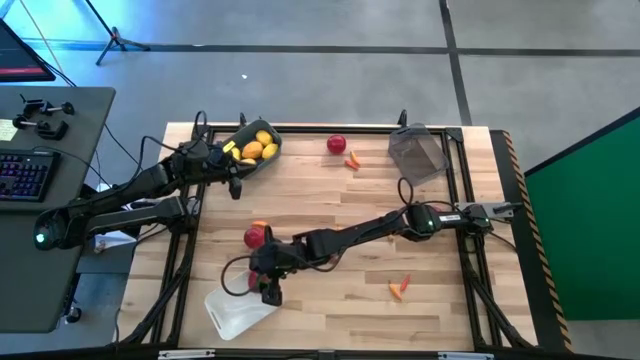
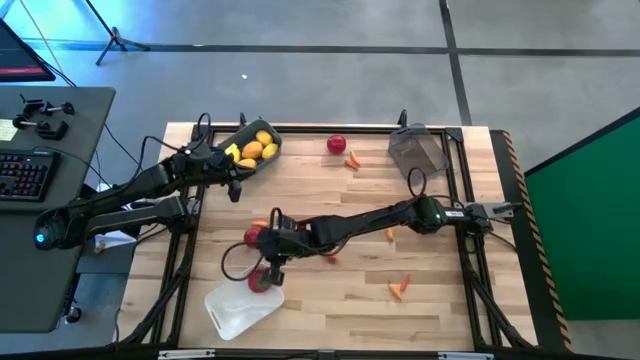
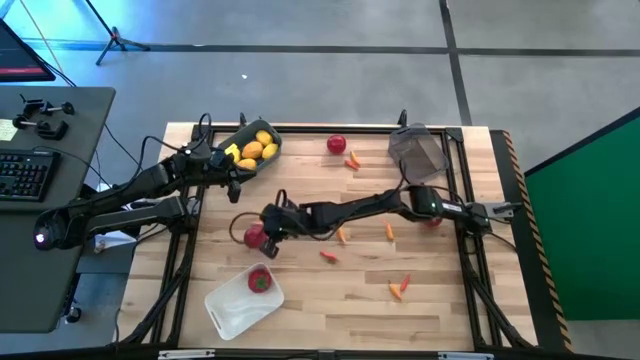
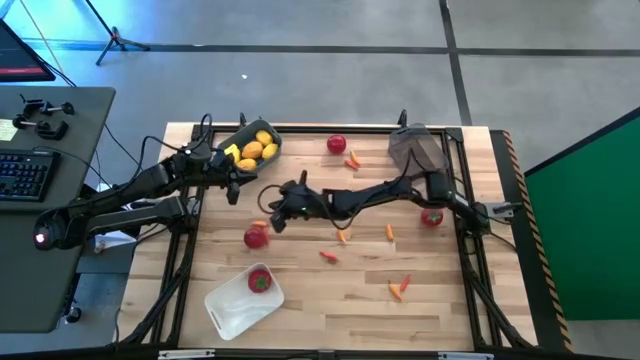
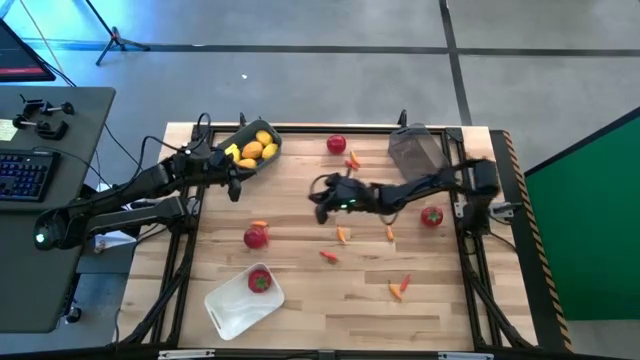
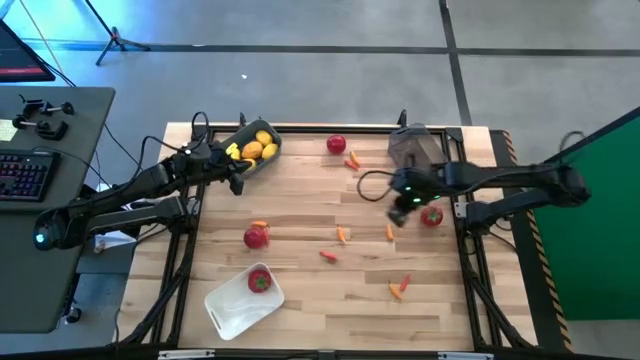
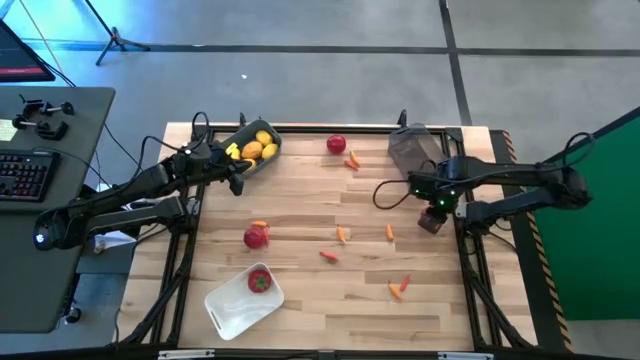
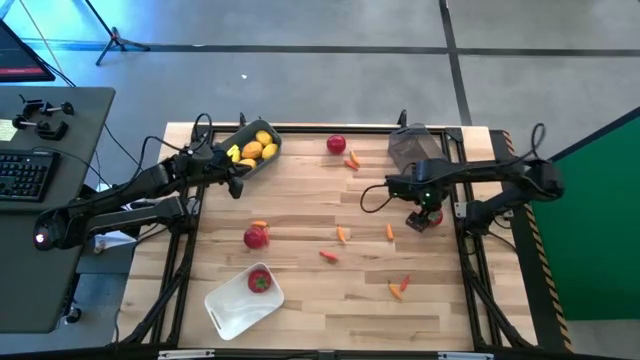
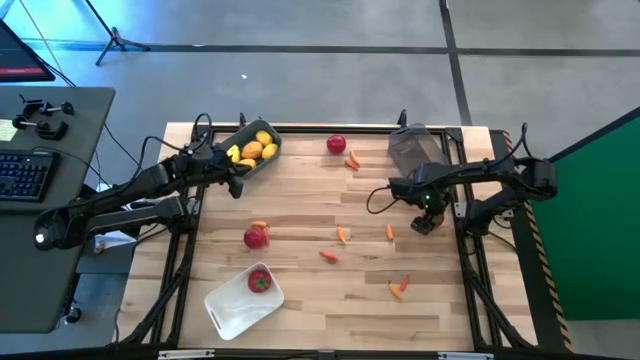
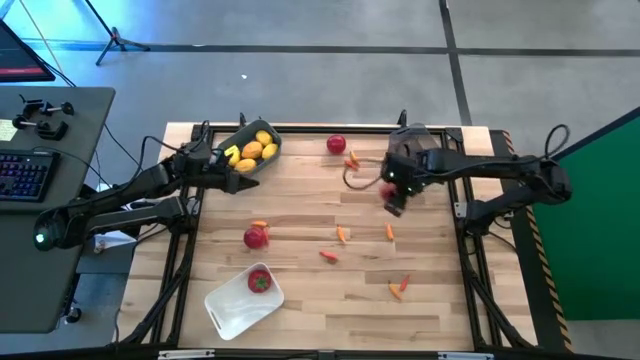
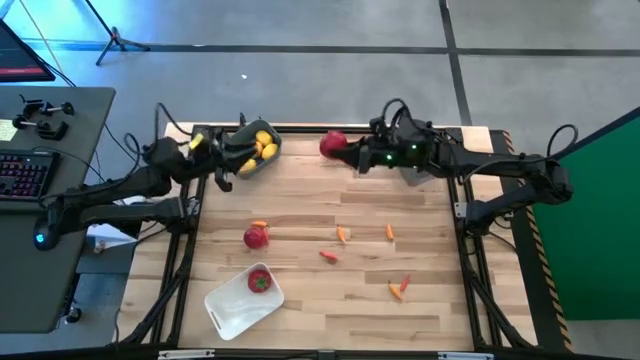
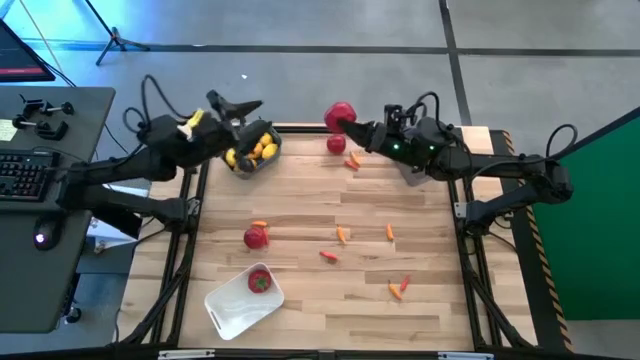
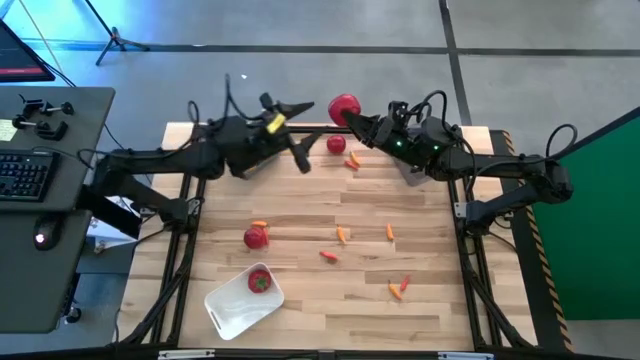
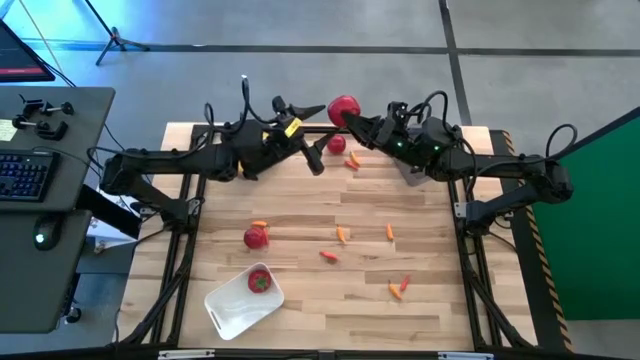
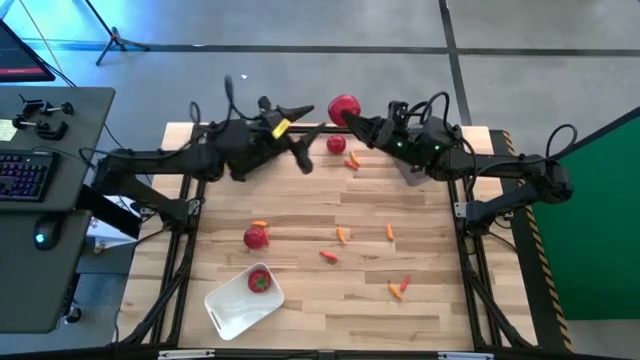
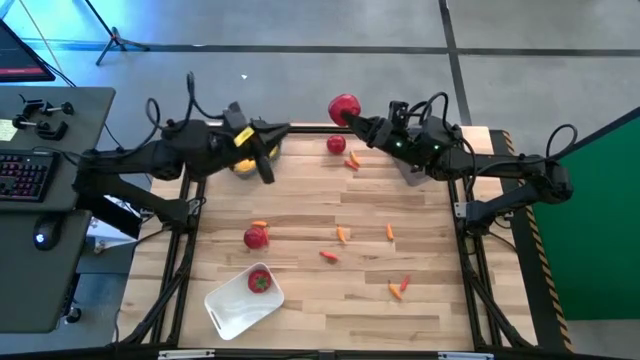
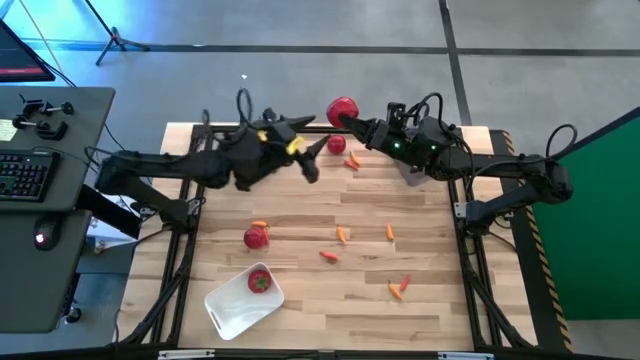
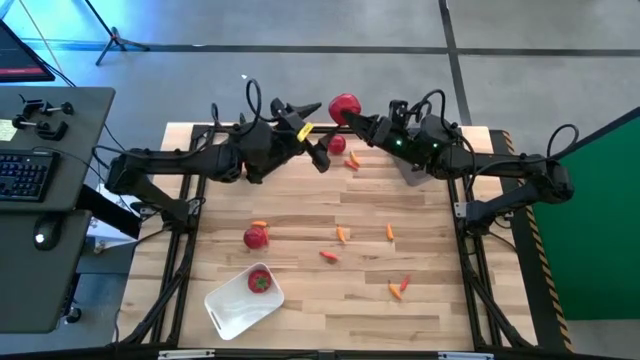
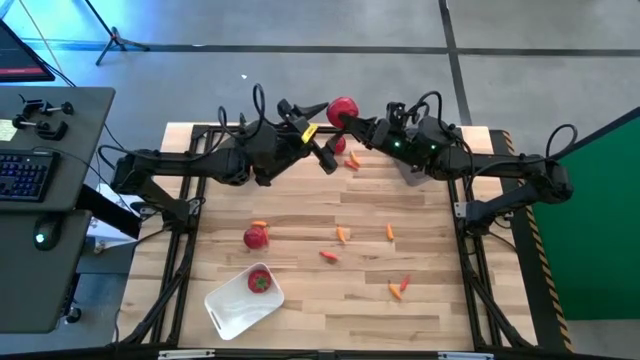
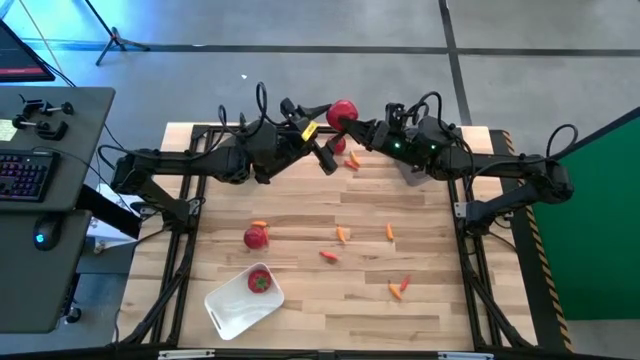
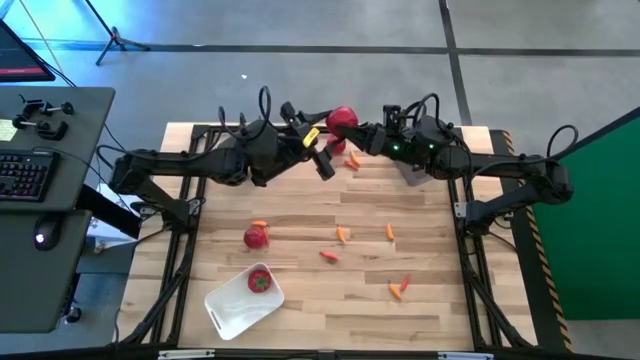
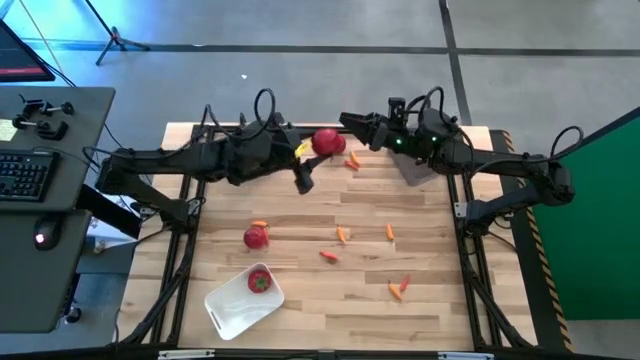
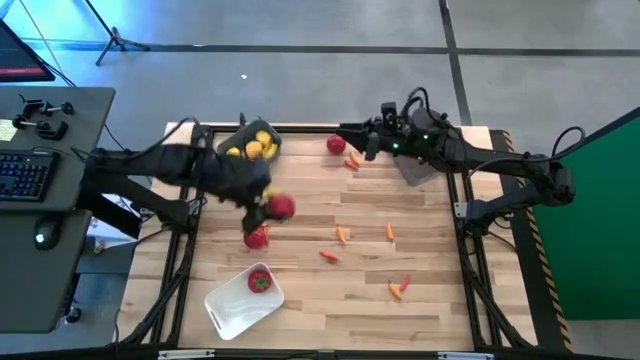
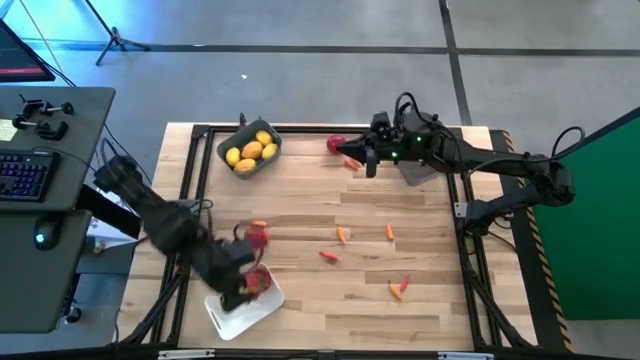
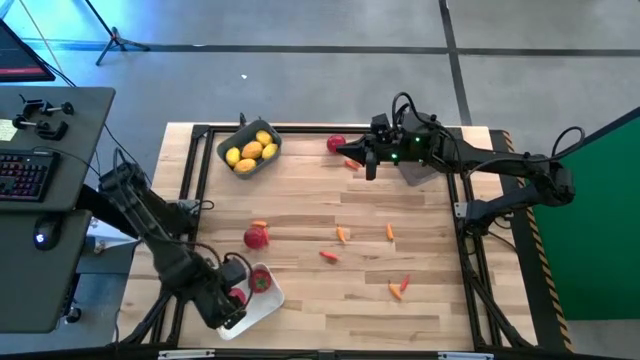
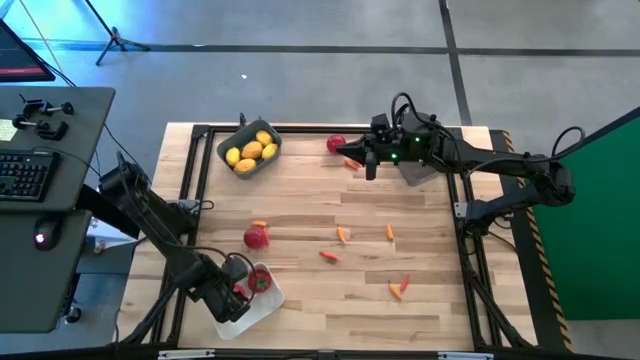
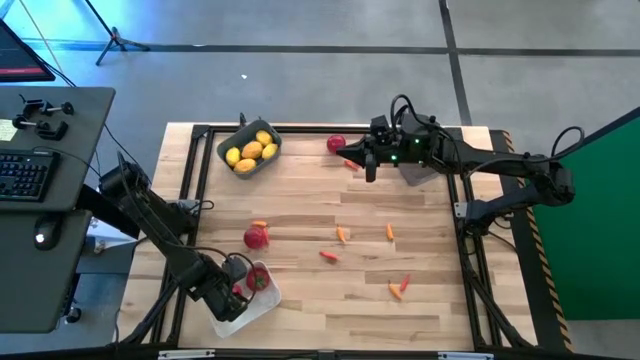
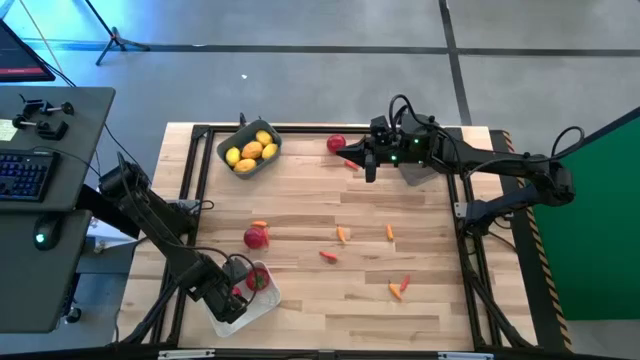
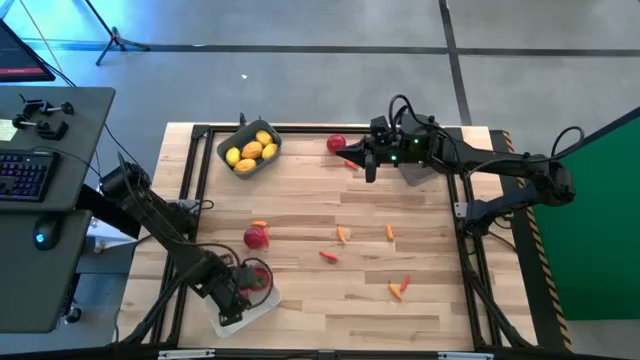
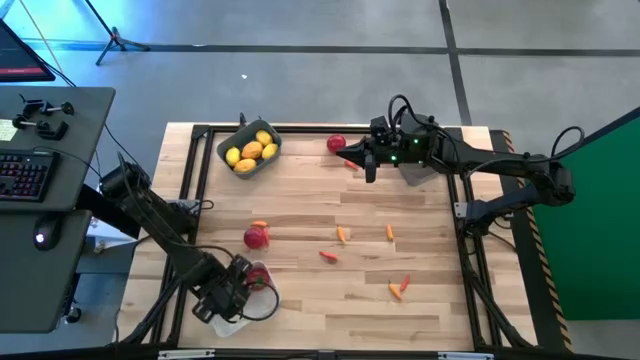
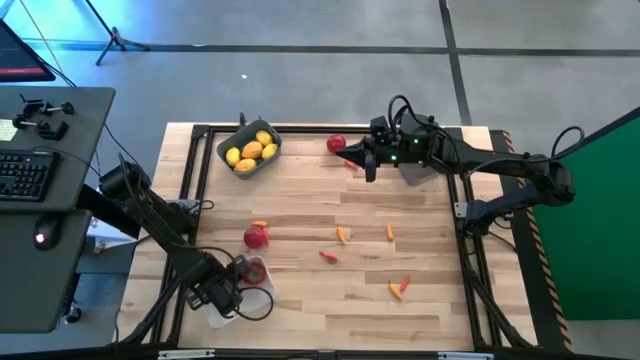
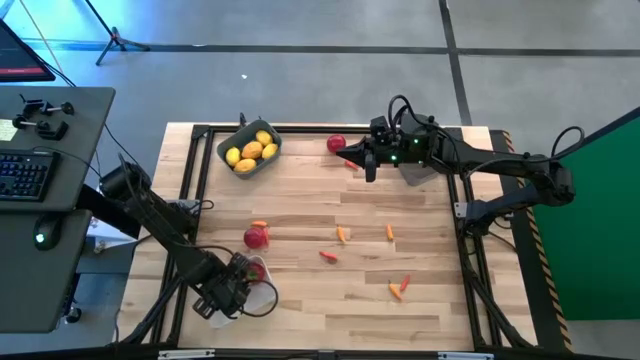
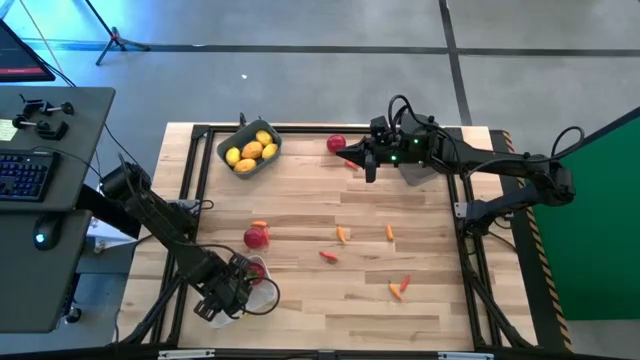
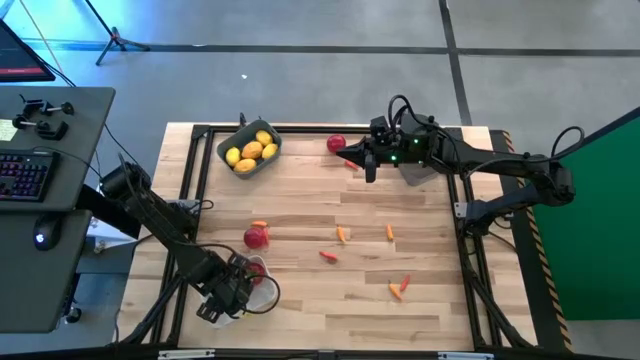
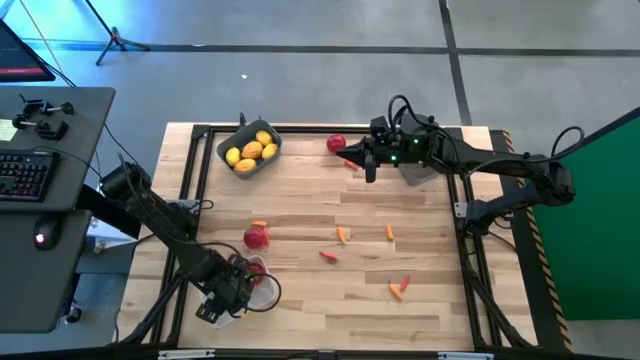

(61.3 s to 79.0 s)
Task: Sort produce into baskets
Put the red tomato into the white bin

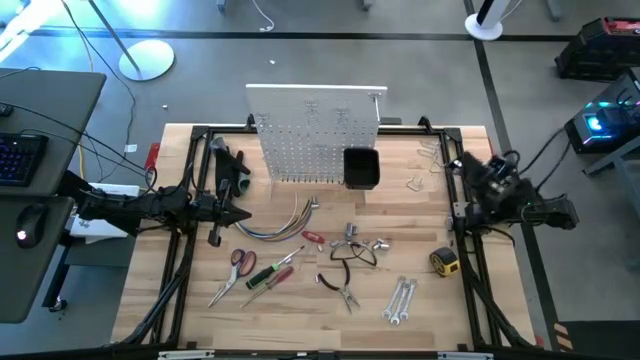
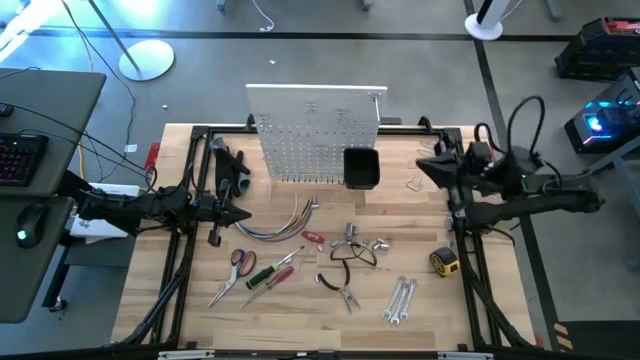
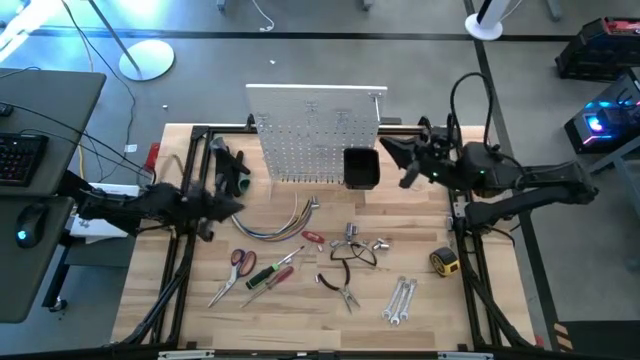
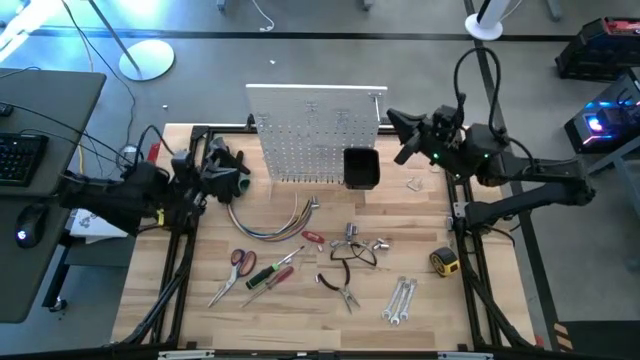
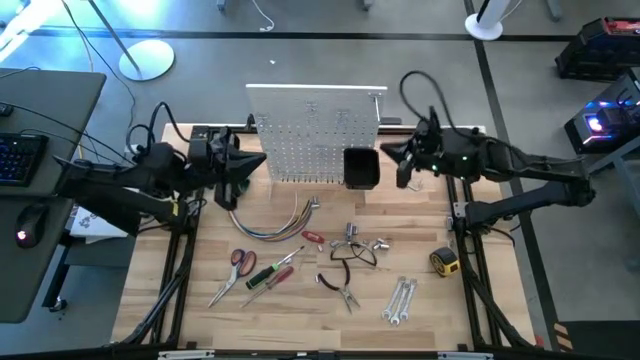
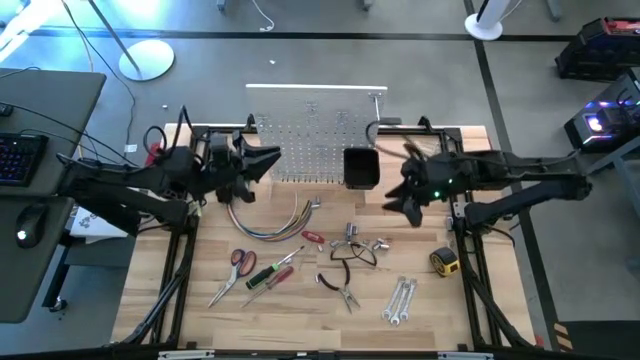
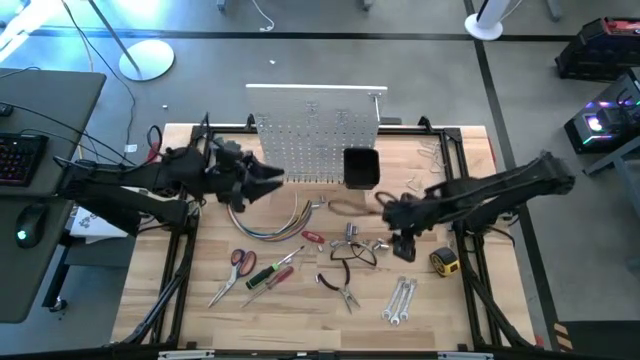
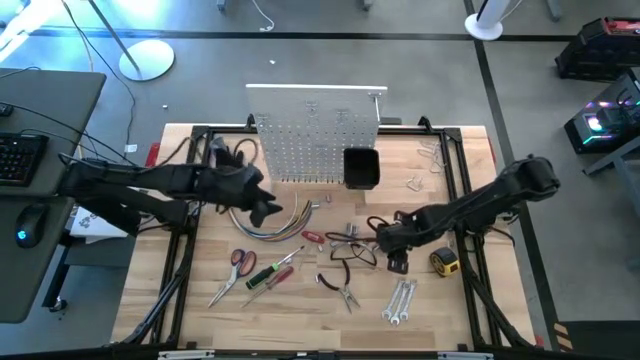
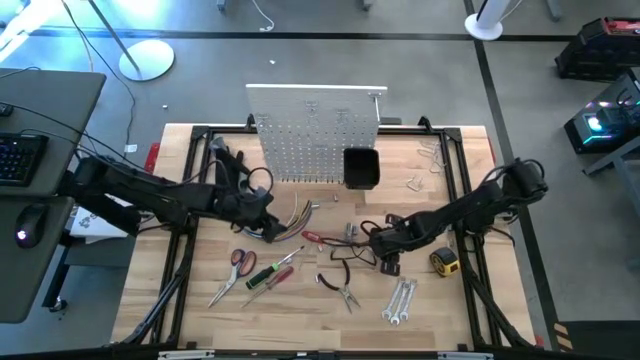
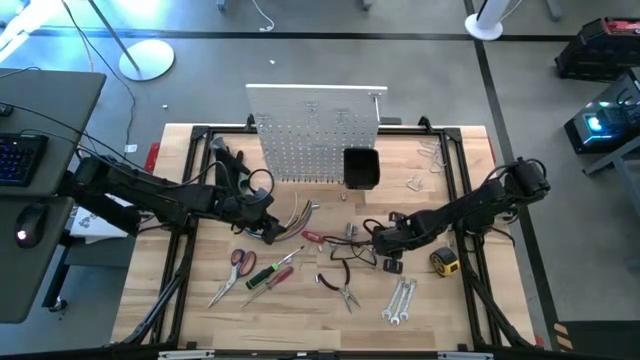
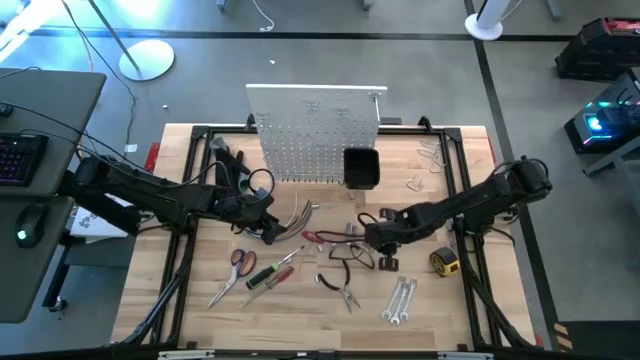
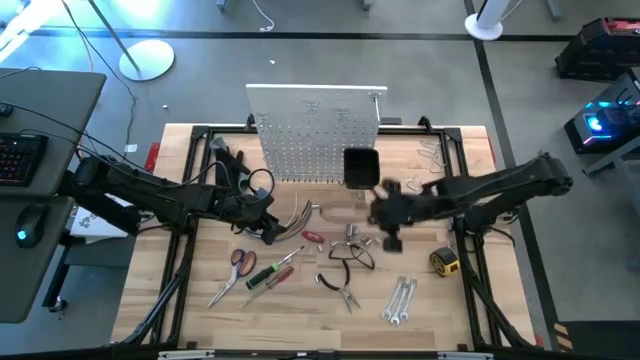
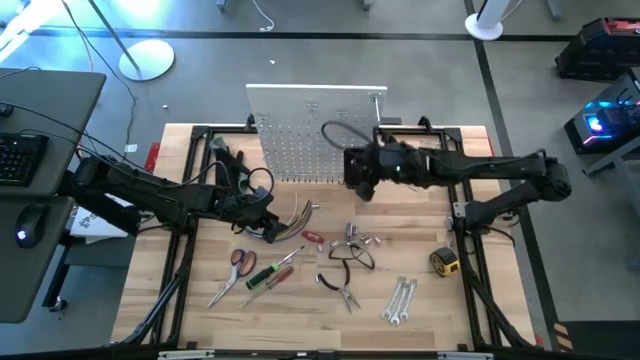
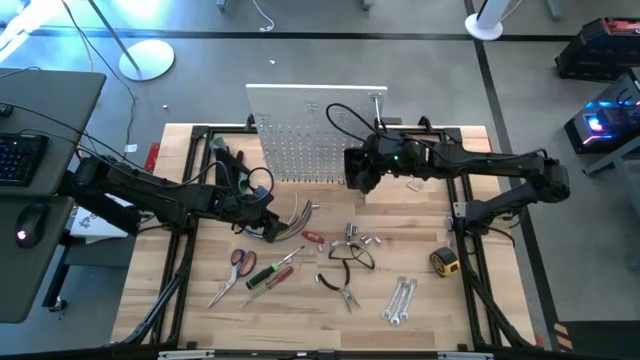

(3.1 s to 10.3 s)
Task: Hang tools onto peg board
Put the socket into the black bin on the peg board
